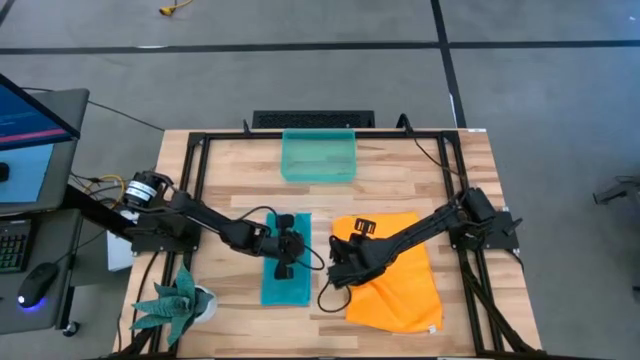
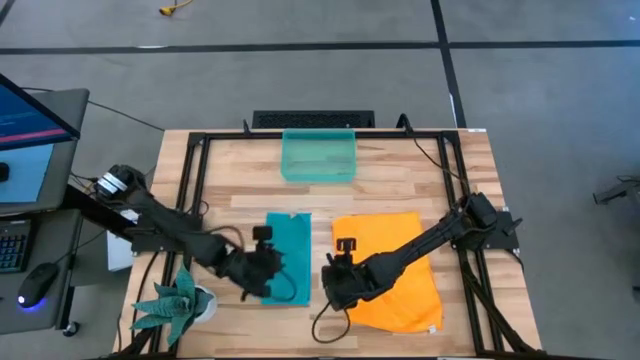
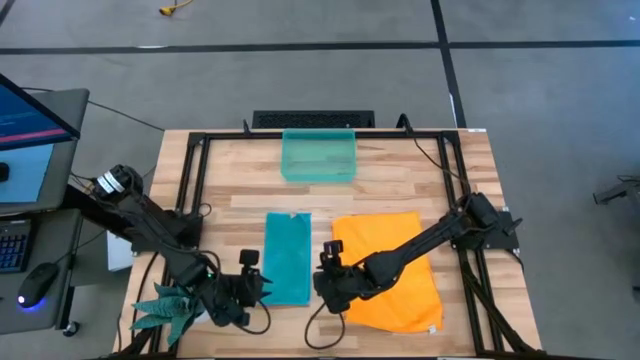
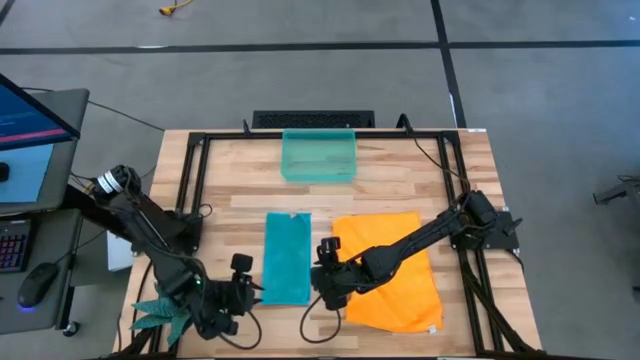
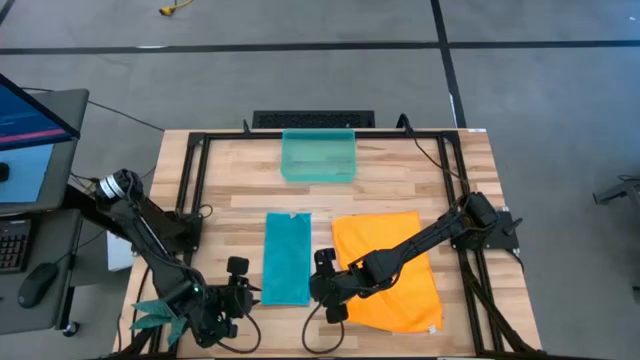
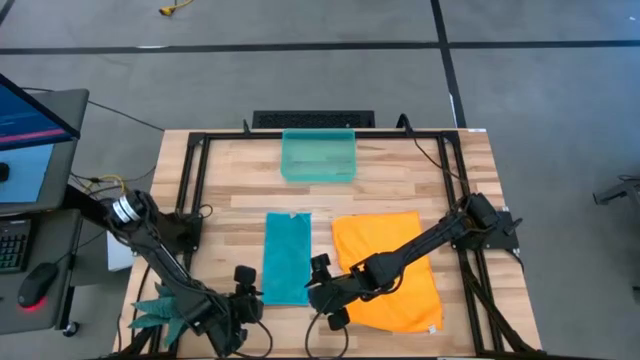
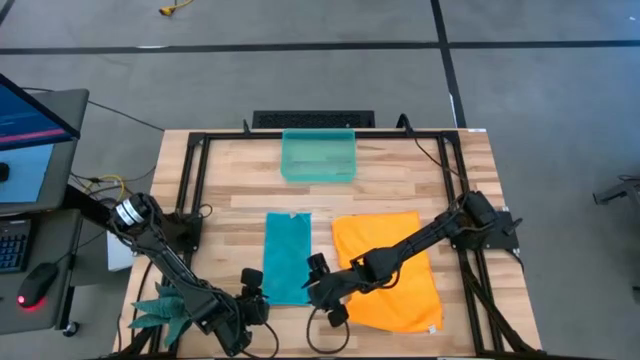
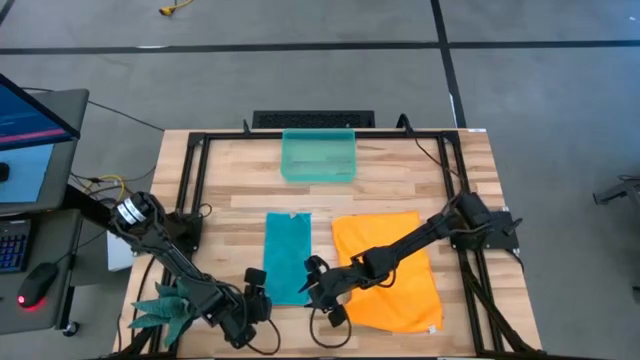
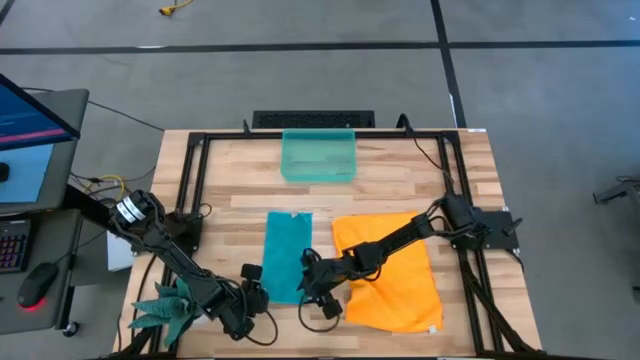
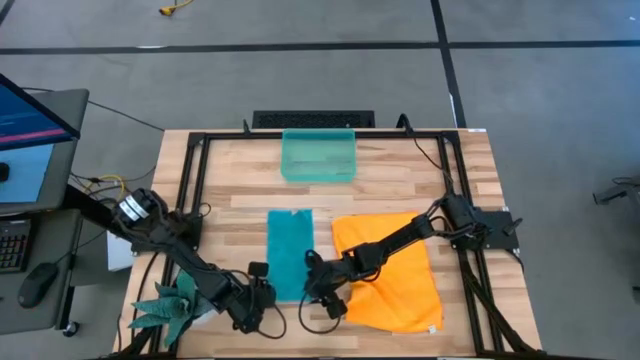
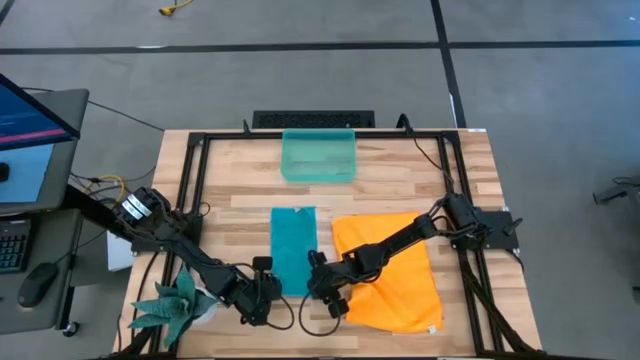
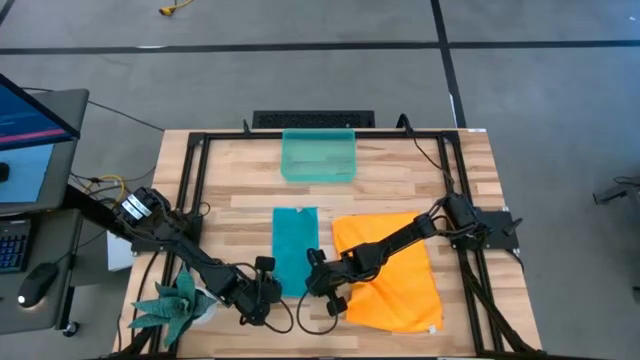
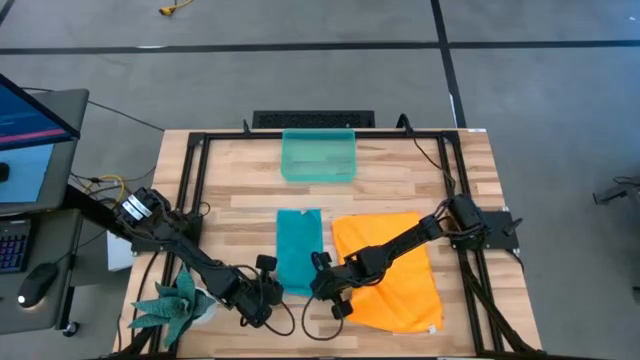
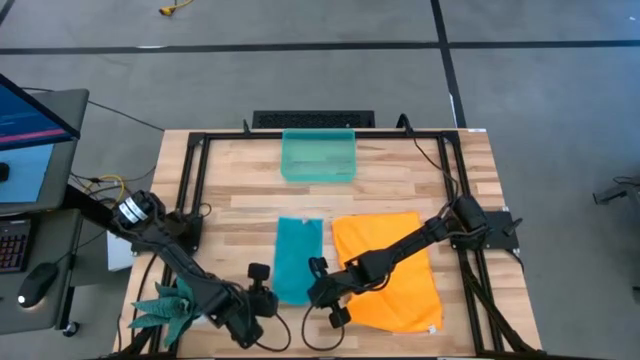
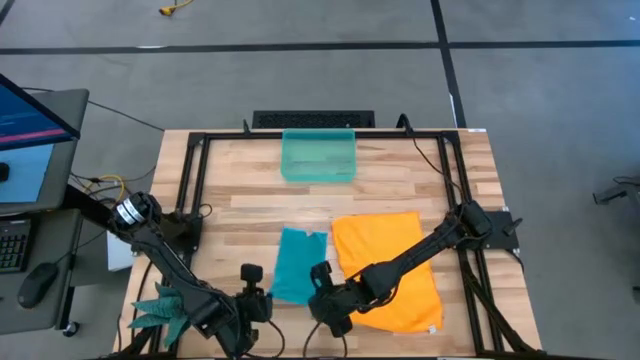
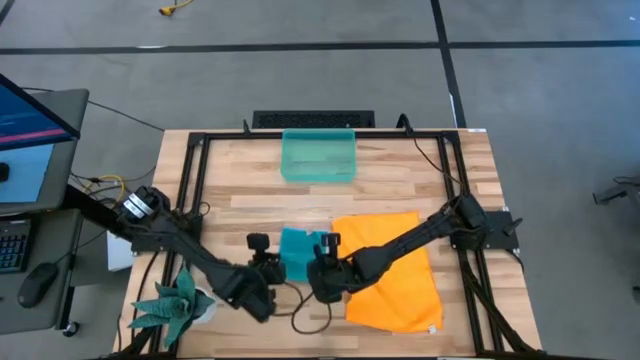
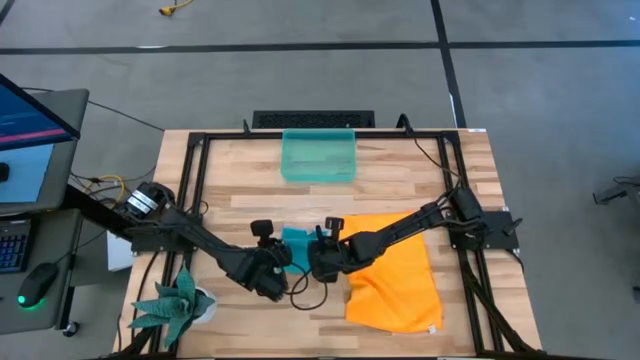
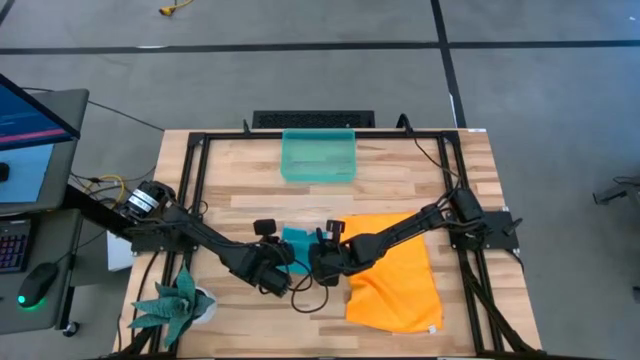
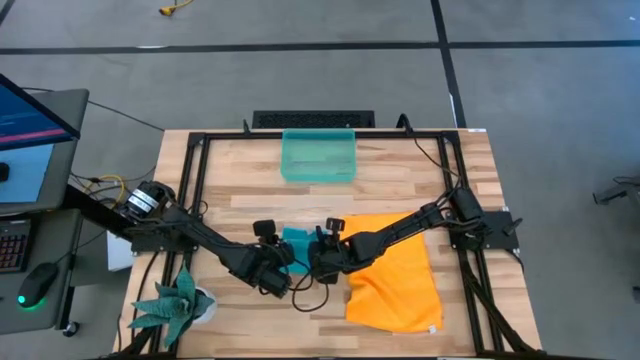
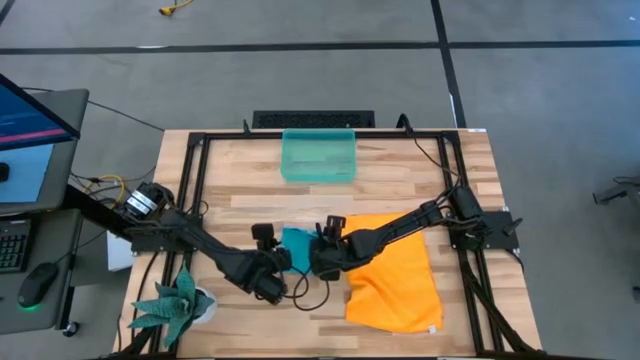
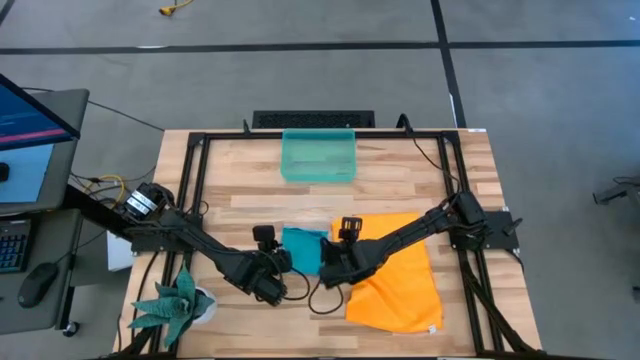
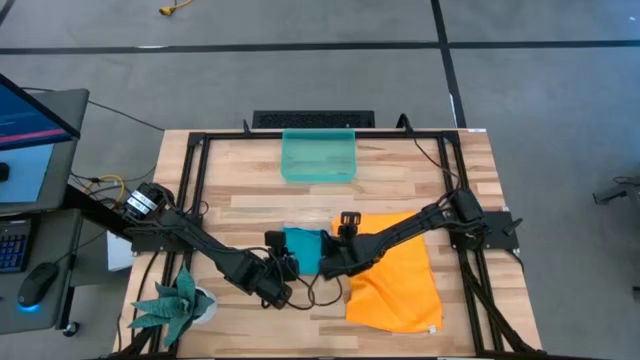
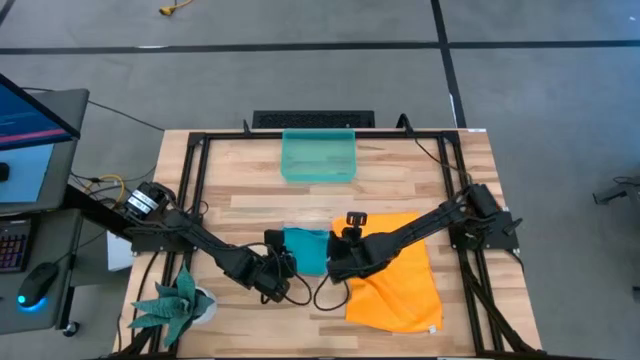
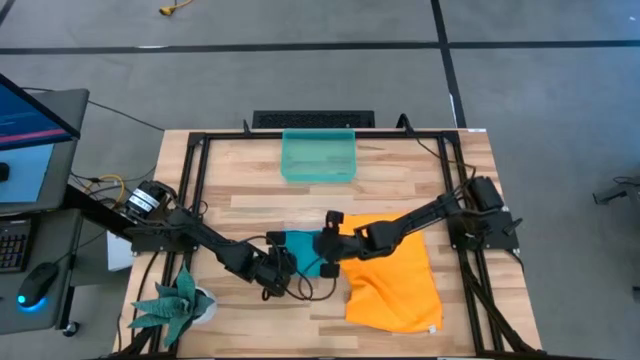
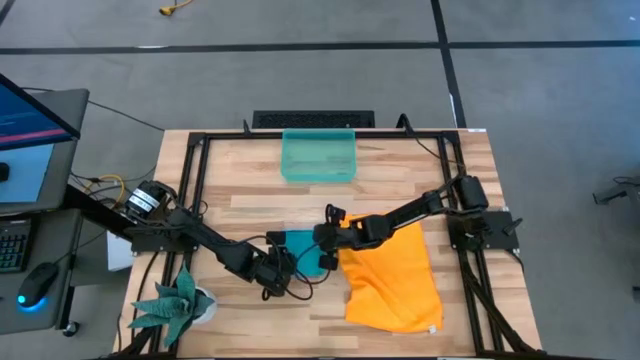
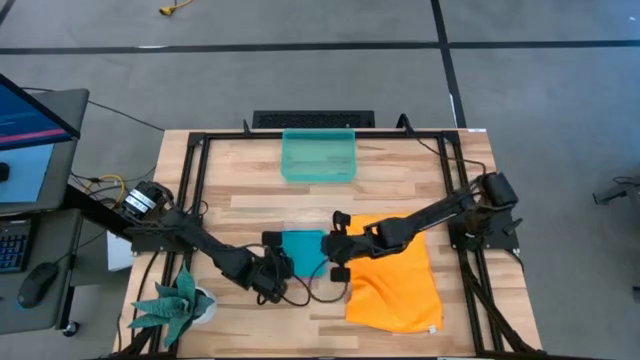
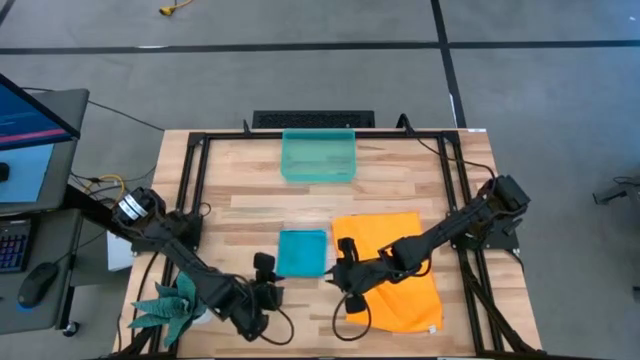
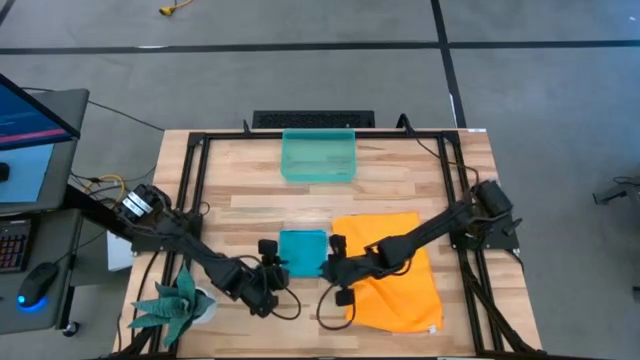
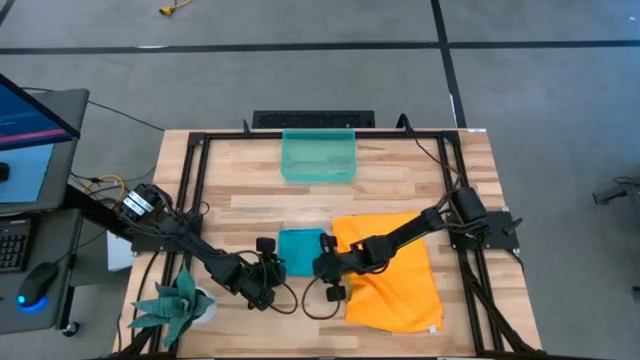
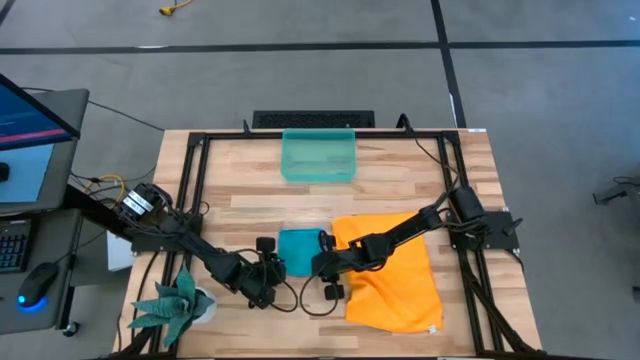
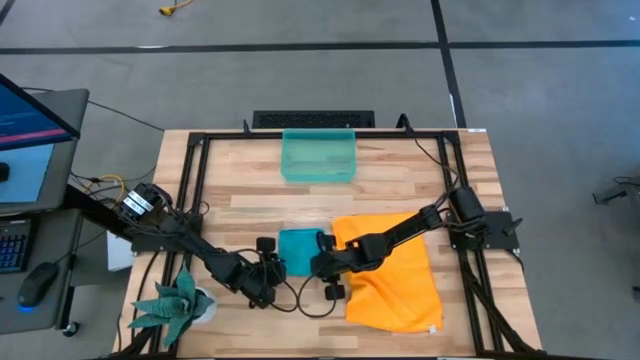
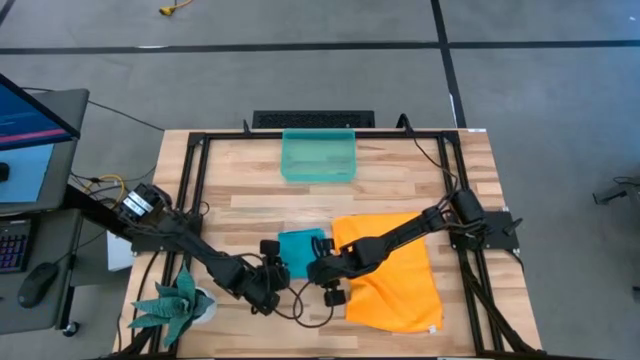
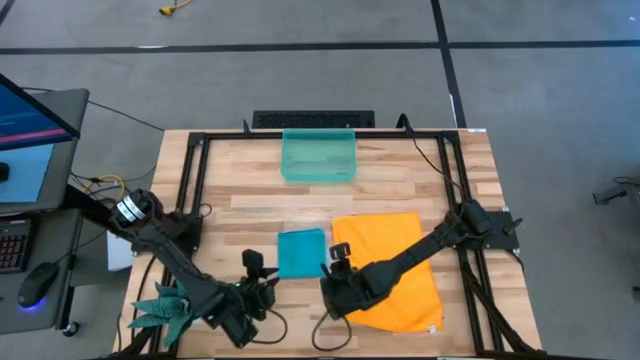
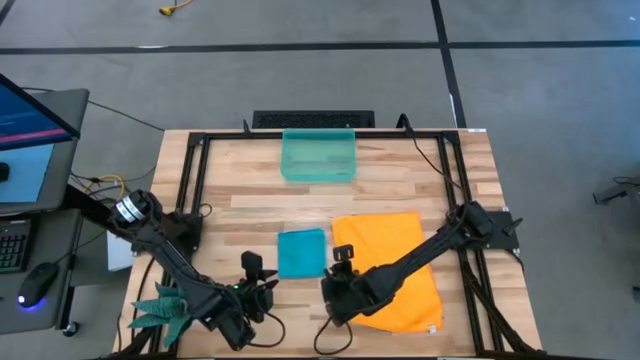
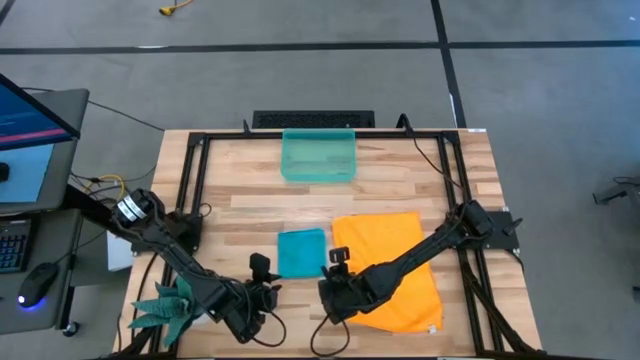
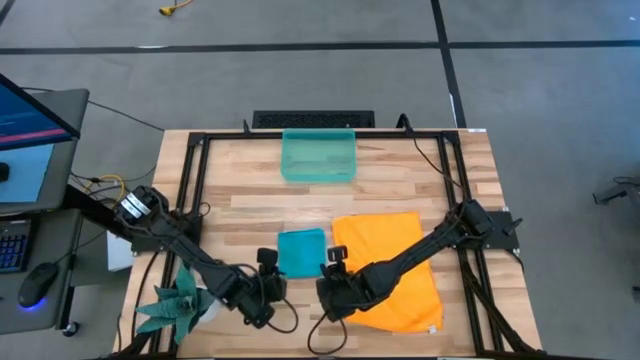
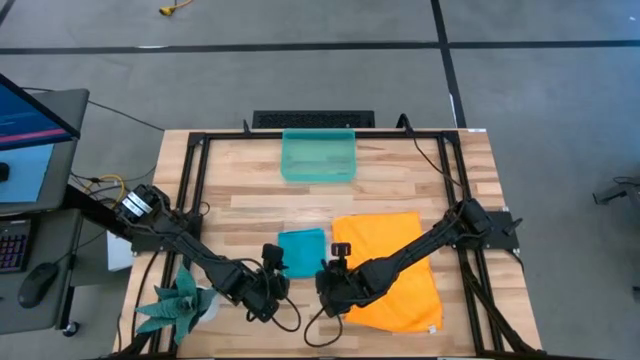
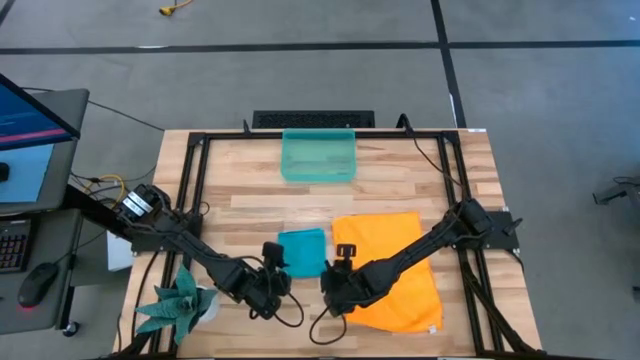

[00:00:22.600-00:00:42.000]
Task: Roll microfiber towels into tight, uniform cylinder then place into a basket
Roll the blue microfiber cloth

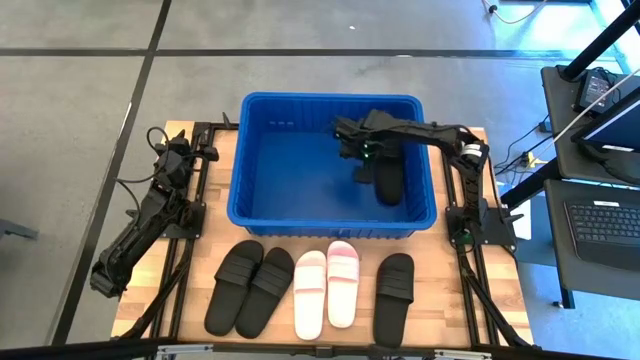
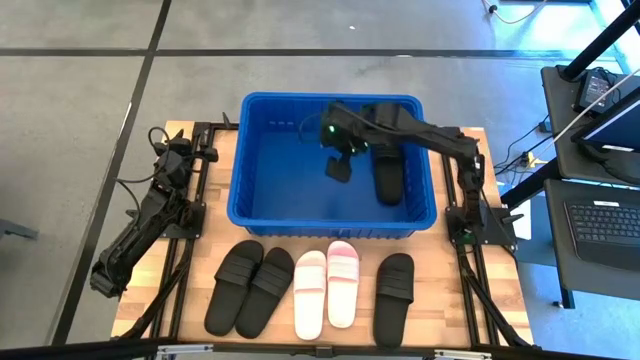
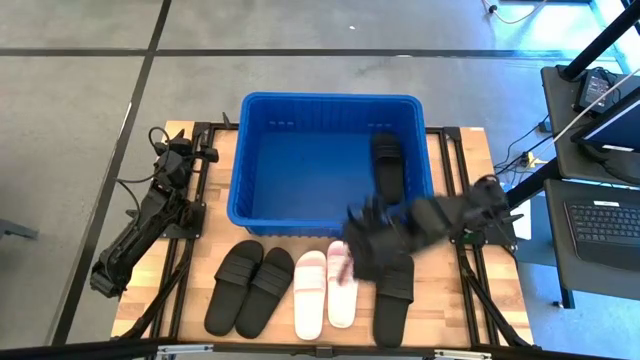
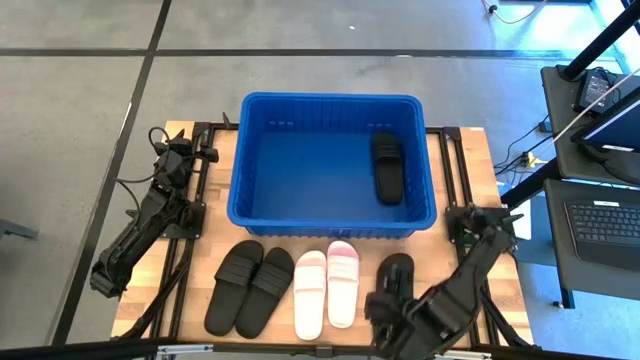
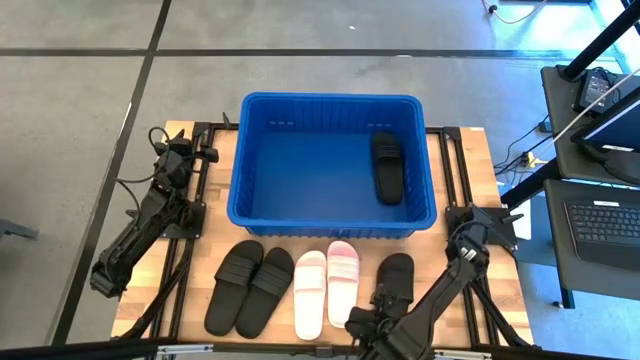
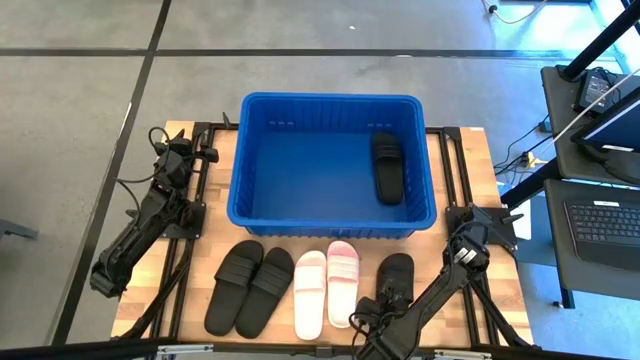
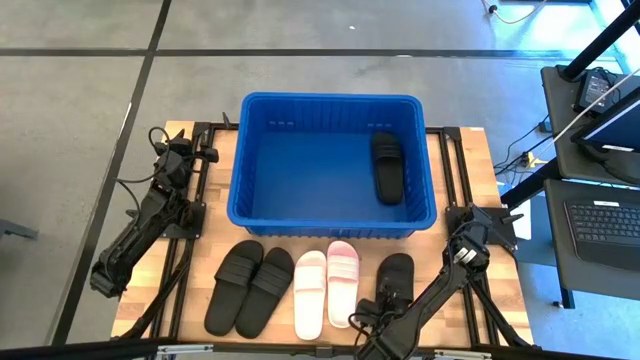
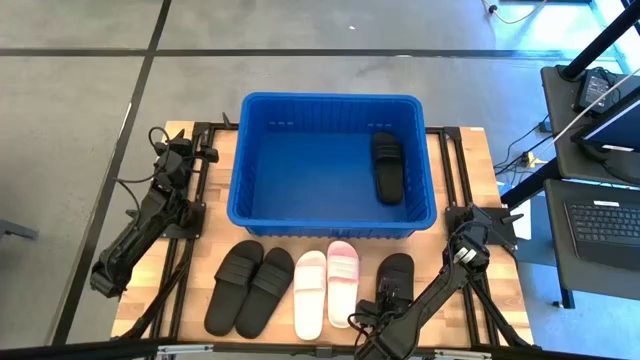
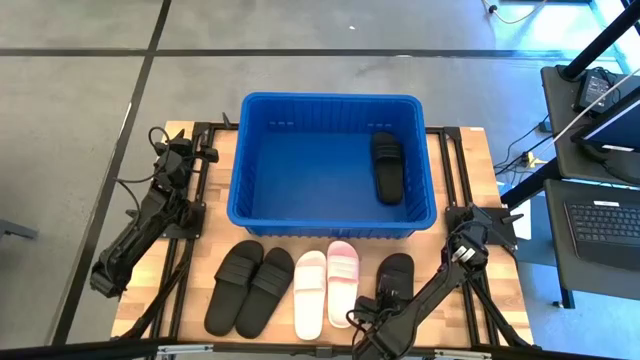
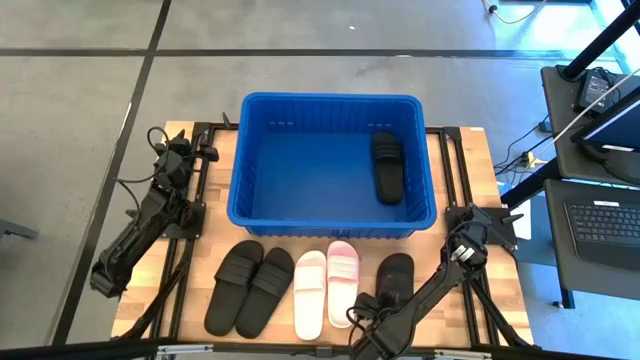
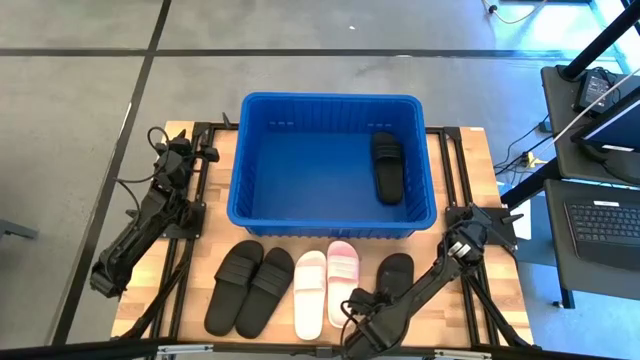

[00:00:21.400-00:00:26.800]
Task: Pick and place slides into bin
Put the black slipper into the blue bin
